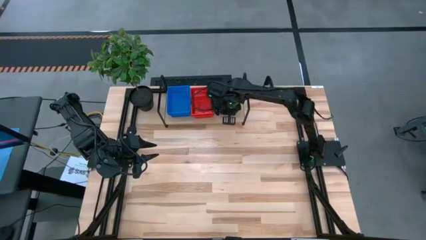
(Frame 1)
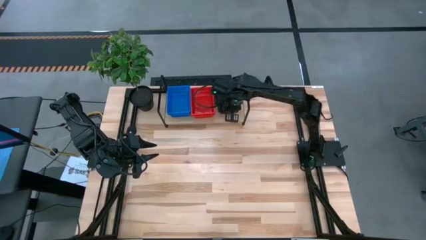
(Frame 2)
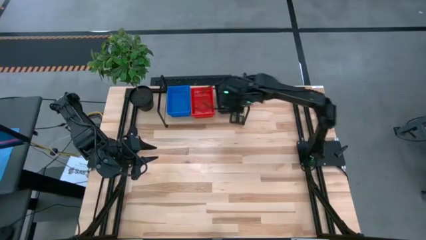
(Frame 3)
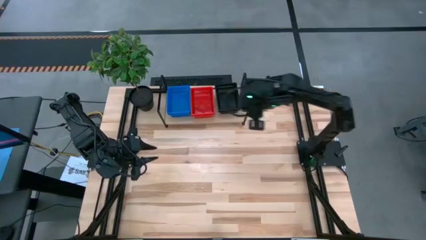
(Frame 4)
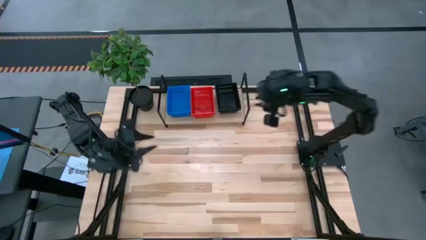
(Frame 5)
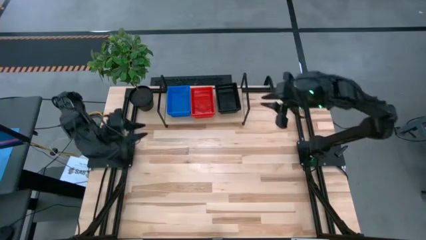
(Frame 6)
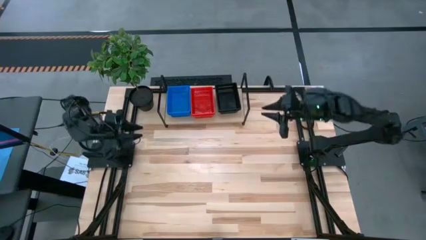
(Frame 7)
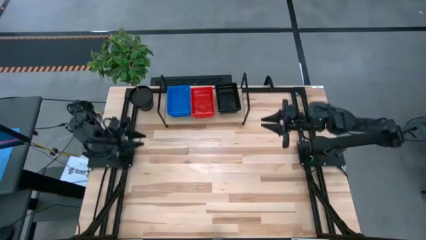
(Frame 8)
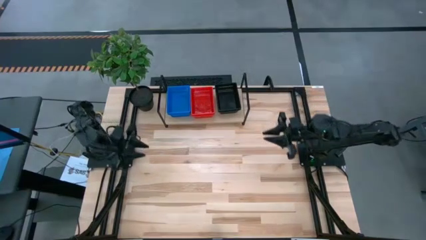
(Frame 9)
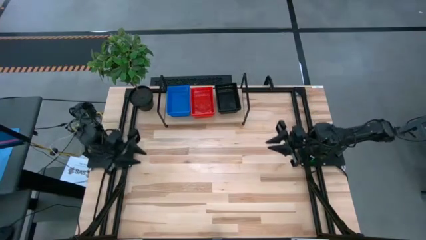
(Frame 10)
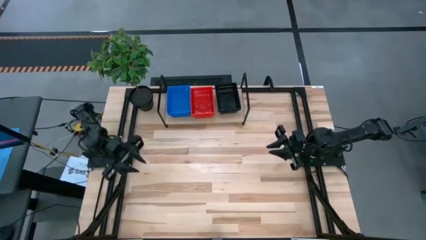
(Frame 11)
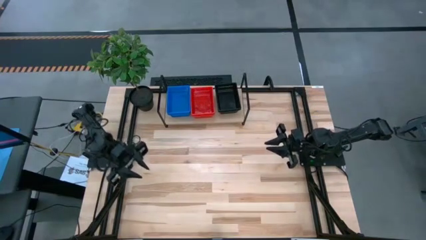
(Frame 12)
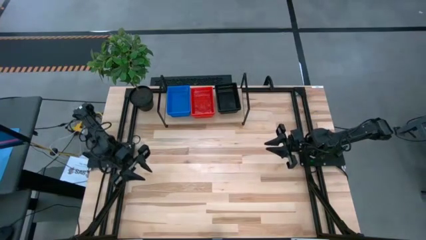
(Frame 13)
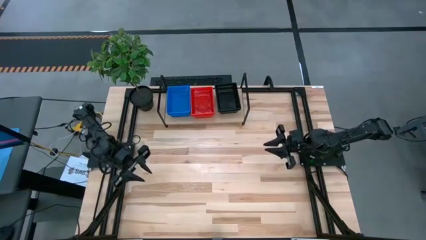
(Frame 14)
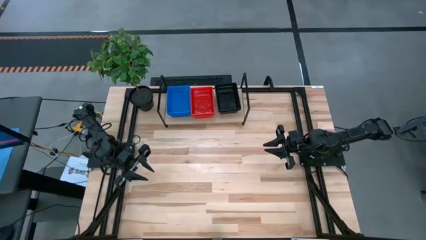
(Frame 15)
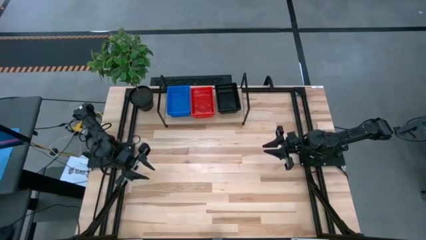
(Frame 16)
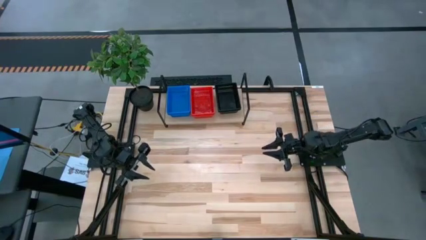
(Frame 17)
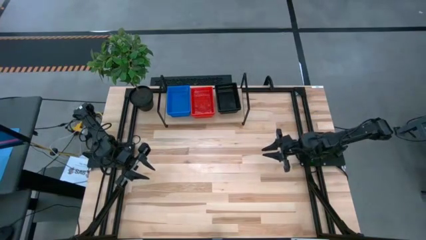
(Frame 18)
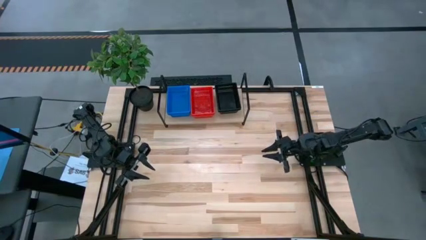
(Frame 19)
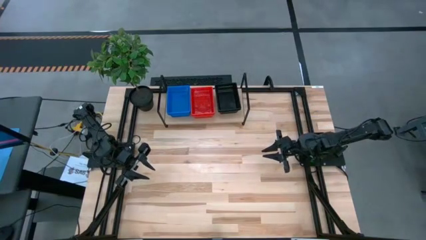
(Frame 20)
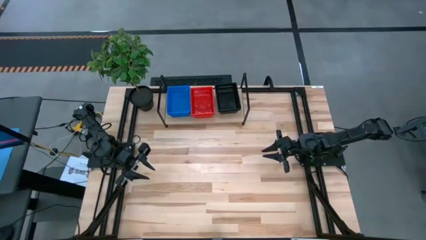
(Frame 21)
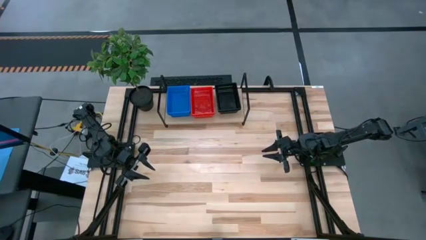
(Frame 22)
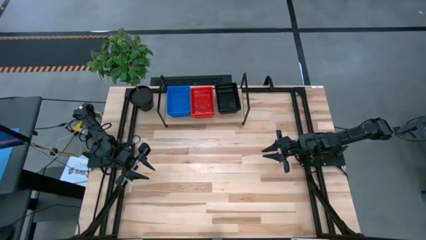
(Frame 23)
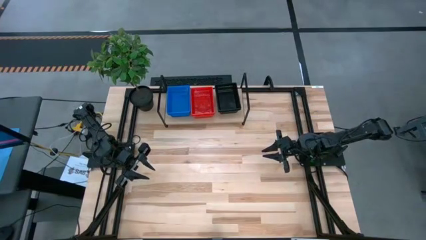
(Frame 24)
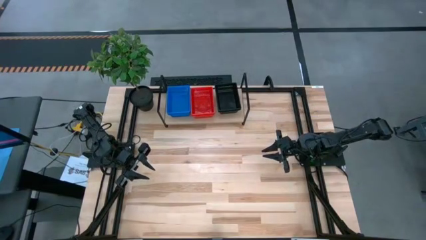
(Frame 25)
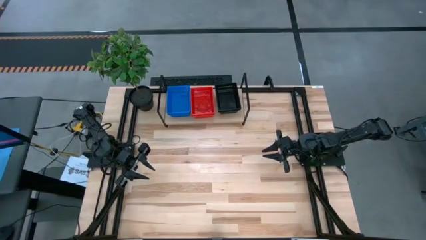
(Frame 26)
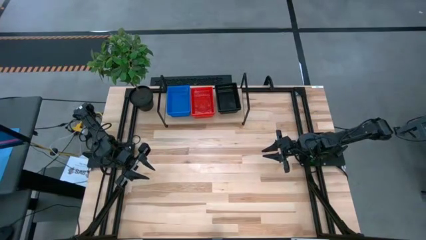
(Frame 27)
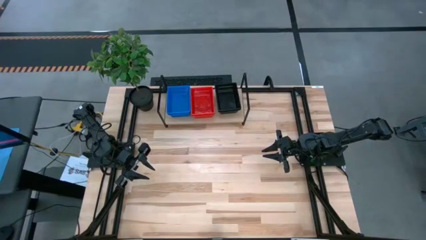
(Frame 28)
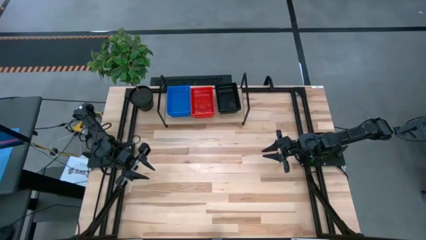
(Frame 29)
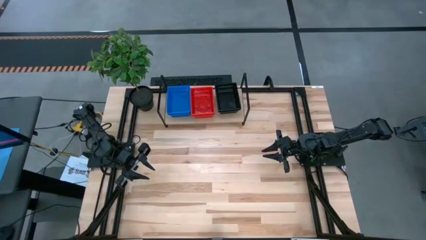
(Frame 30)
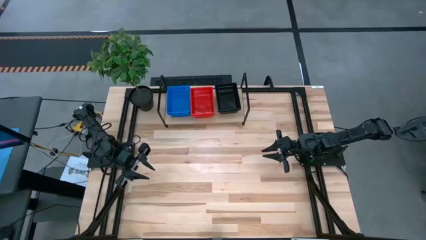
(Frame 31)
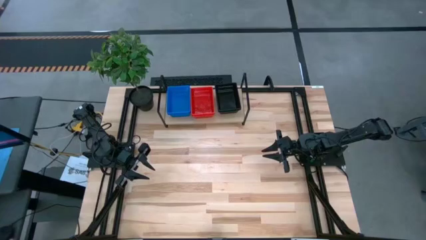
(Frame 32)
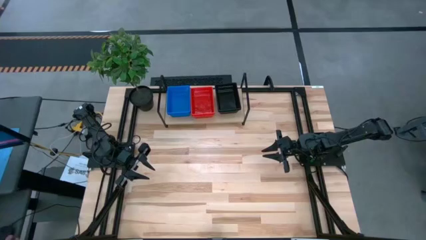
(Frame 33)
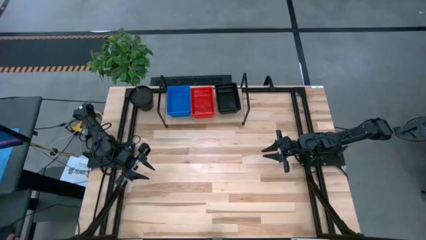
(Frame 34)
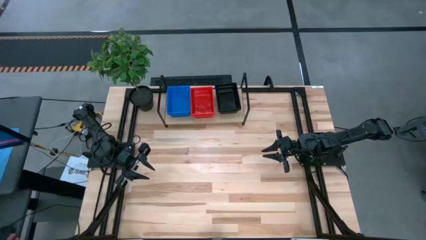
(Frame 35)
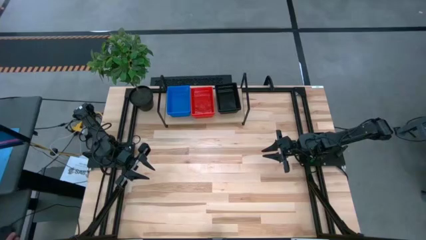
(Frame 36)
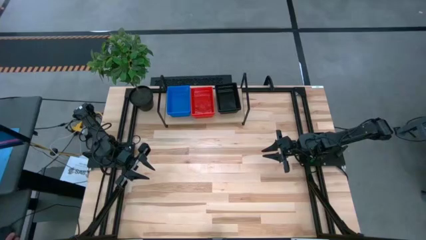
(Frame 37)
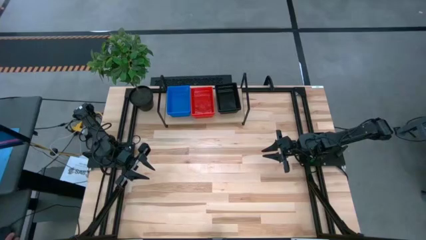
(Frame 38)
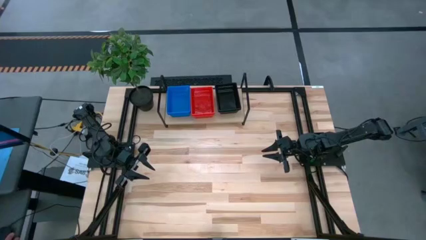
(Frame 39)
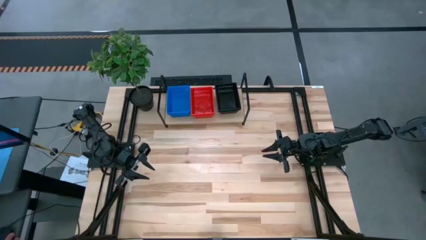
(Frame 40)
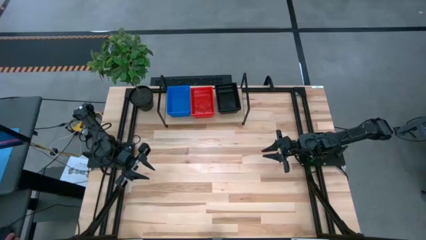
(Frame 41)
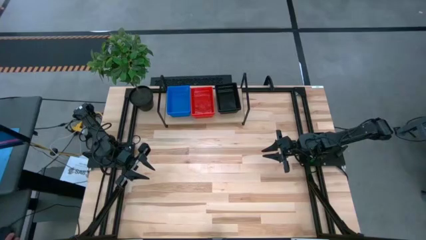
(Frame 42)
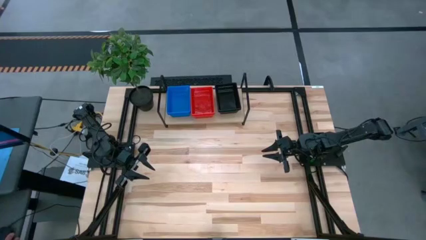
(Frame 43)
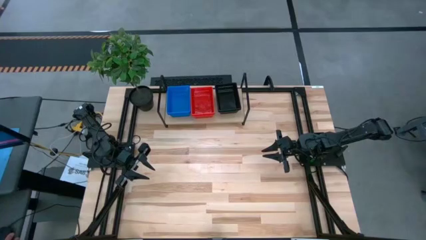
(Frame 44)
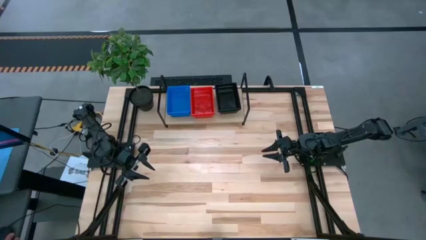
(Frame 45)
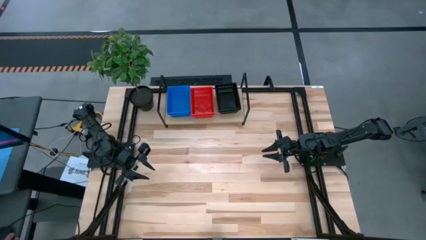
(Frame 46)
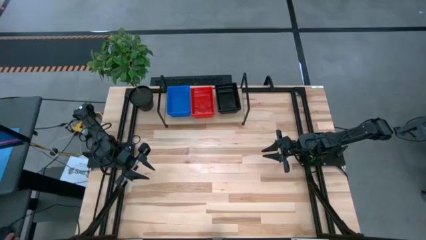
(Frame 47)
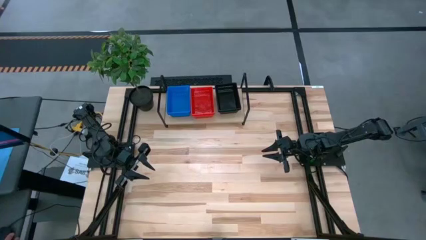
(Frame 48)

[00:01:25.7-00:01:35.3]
Task: Stack baskets on shelf by color
Return to Home Position

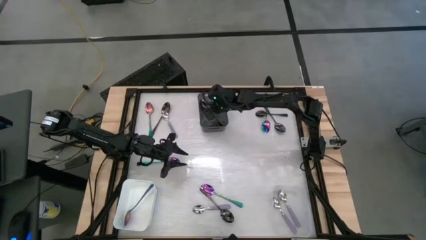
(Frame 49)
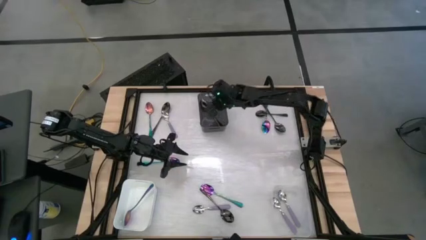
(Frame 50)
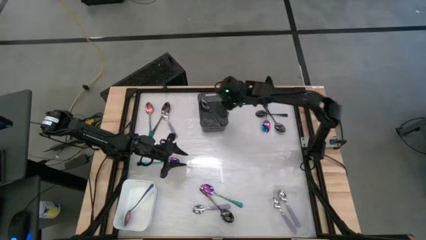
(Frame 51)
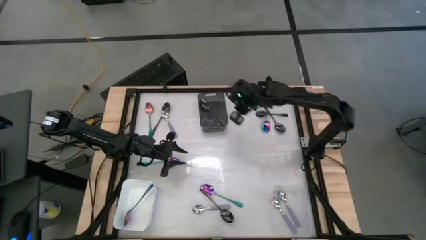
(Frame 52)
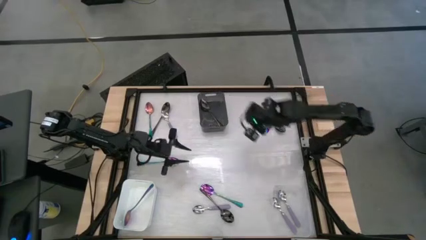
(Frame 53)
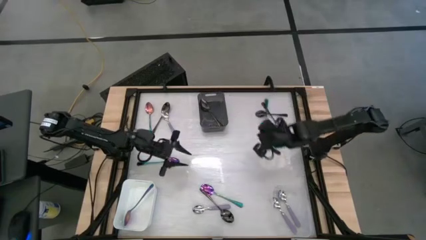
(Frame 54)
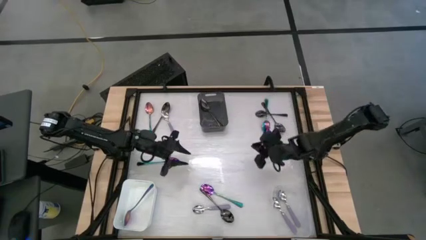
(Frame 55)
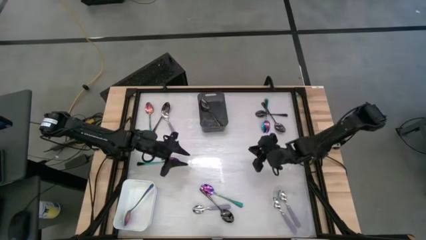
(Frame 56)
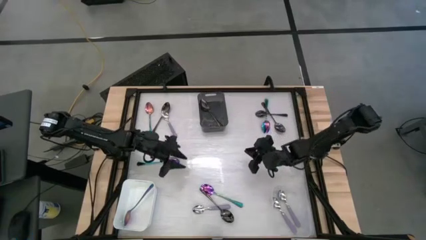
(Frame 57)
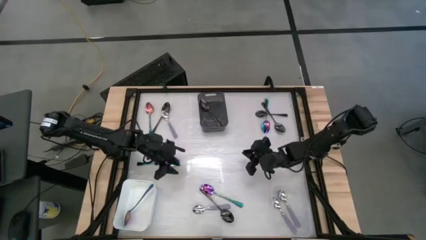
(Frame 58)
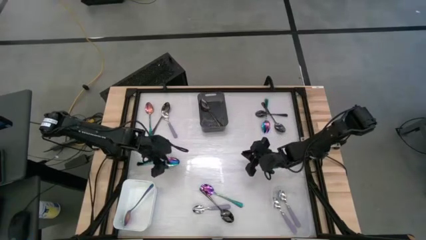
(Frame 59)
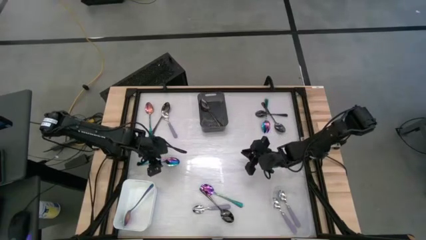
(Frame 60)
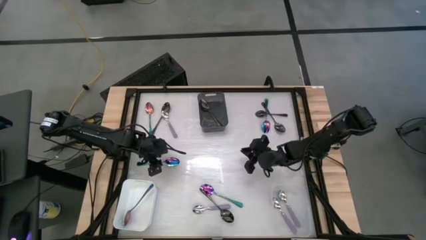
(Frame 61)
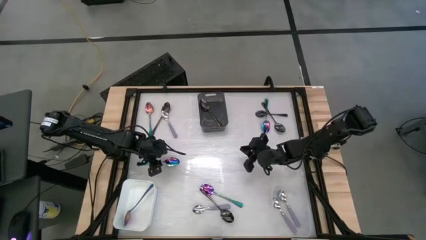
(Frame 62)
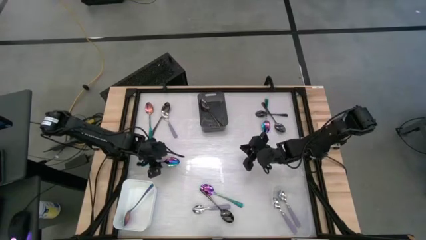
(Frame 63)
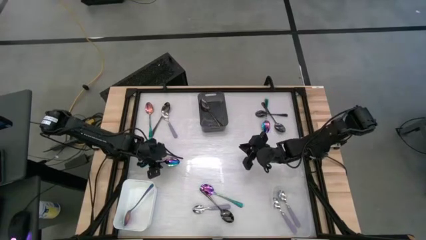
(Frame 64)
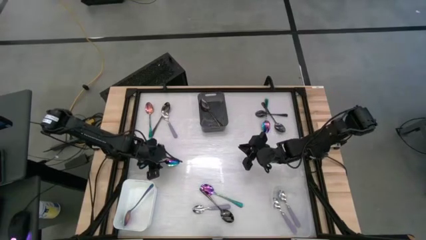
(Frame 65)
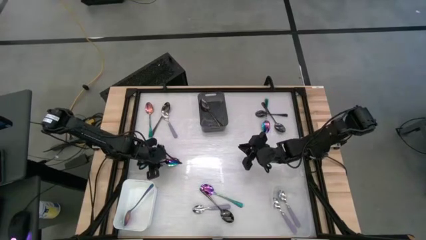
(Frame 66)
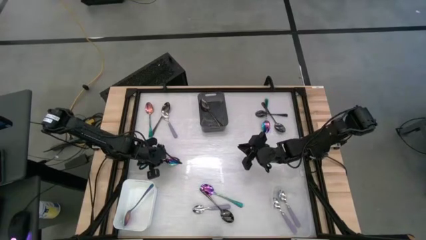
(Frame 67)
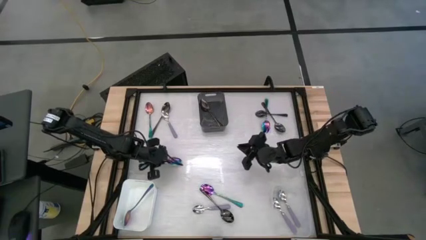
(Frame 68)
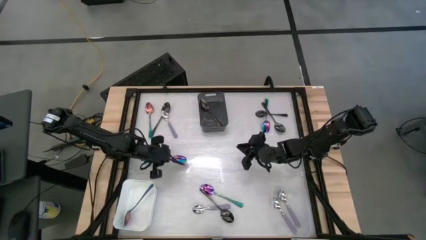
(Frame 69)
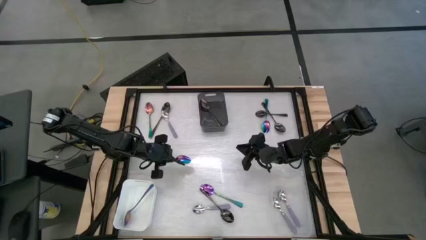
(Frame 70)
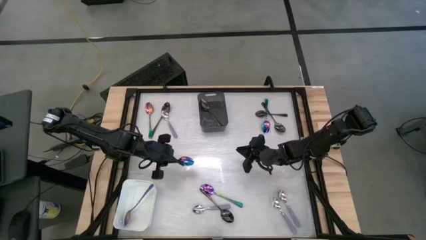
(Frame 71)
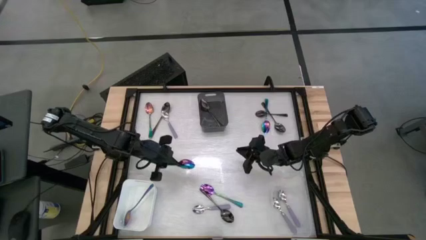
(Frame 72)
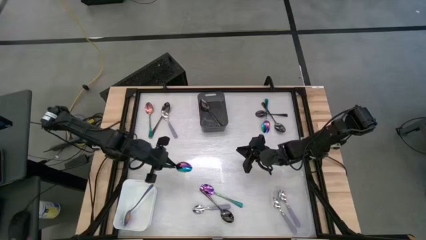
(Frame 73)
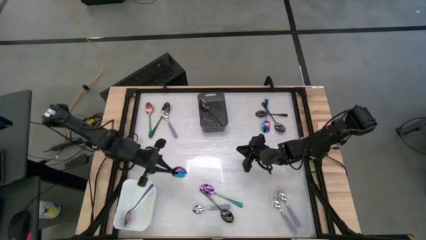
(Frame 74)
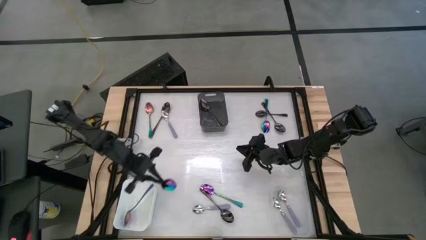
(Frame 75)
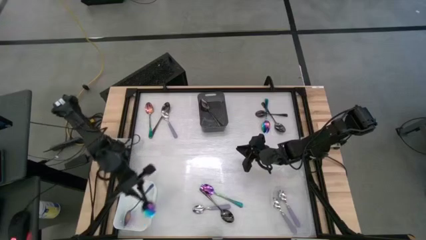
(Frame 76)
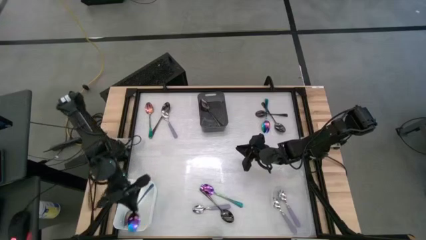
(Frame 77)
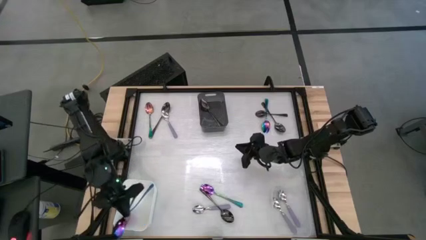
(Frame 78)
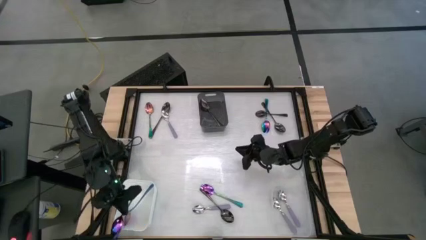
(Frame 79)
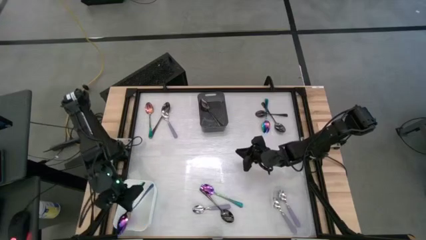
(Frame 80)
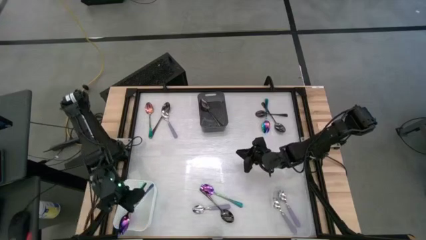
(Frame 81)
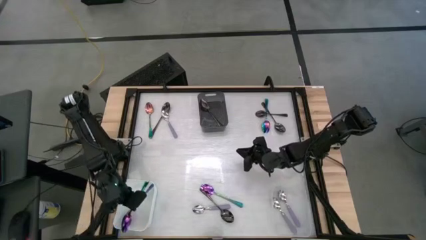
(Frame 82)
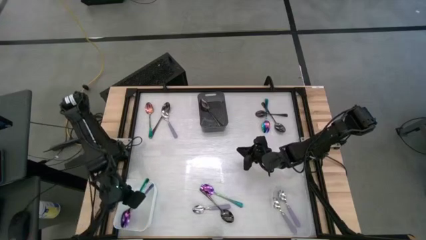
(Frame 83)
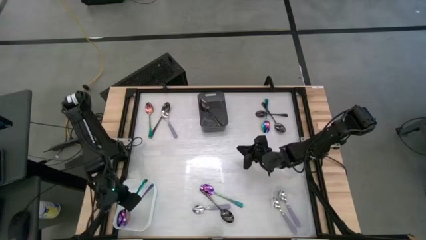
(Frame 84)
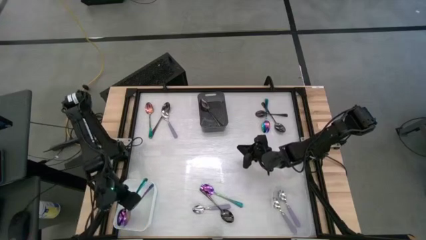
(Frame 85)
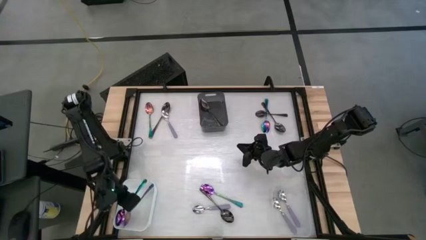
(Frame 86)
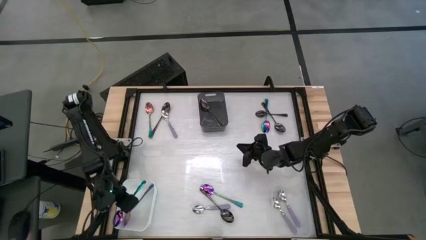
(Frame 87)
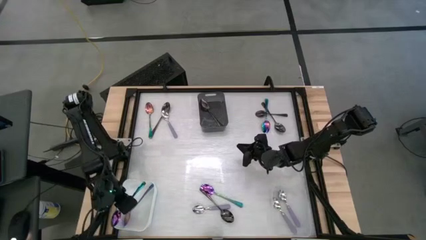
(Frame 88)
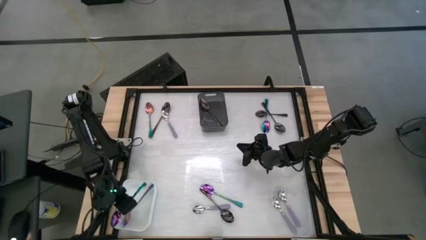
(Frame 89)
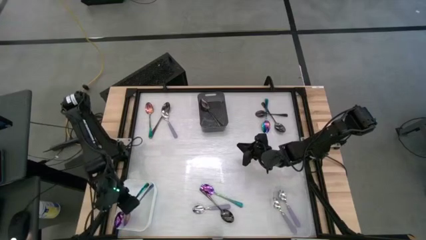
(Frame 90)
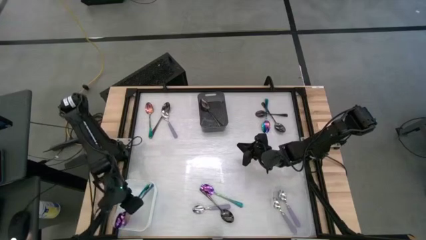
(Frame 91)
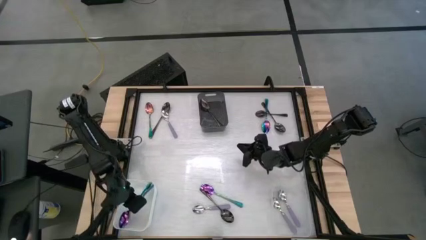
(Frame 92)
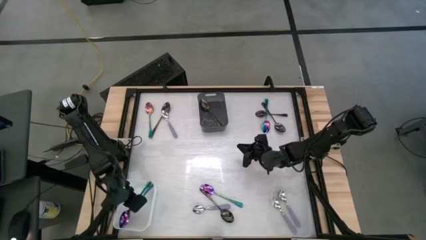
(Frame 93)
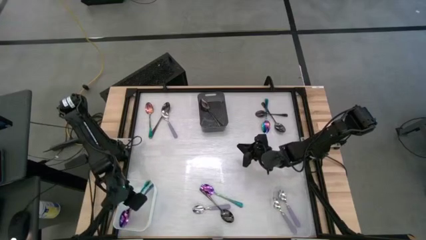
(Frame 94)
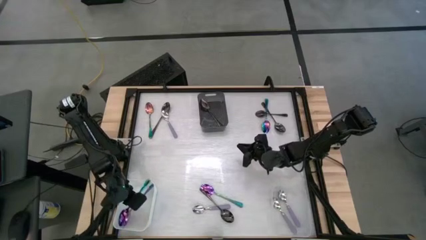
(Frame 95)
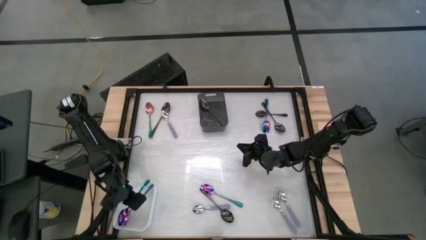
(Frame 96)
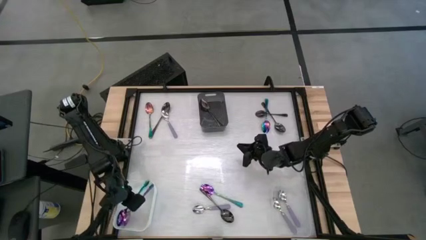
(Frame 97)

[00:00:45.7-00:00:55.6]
Task: Sort silverware by color (type)
Put the blue spoon into the white bin
